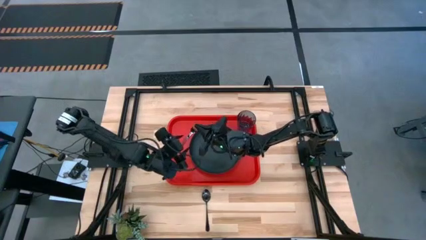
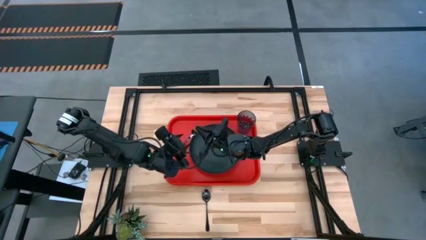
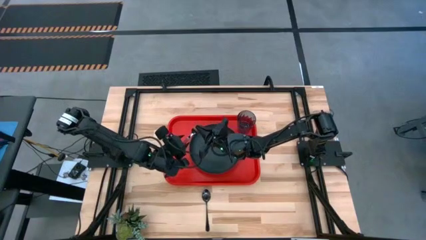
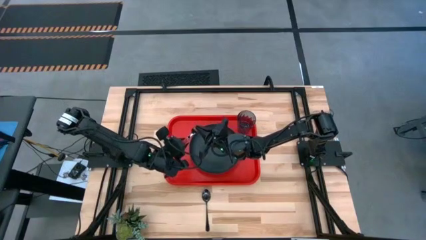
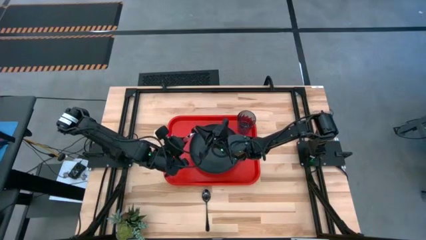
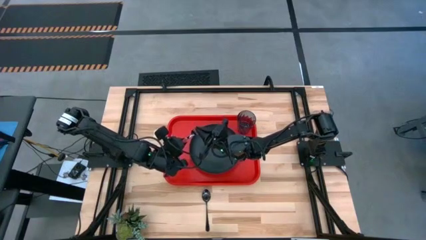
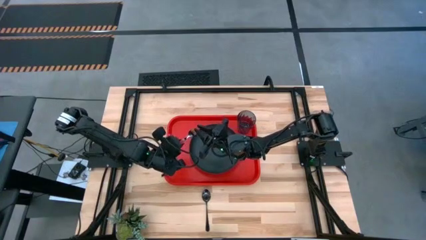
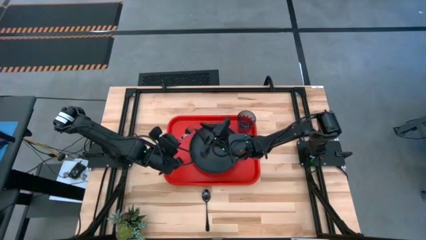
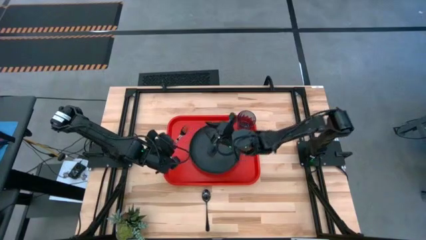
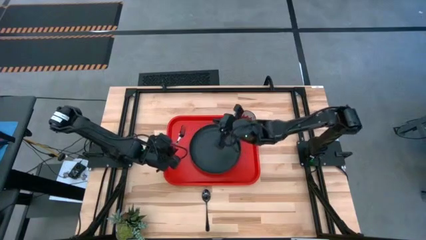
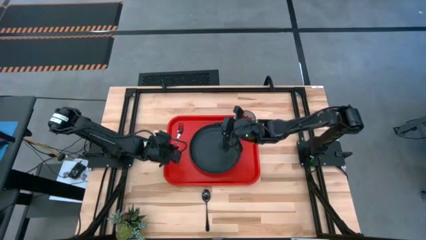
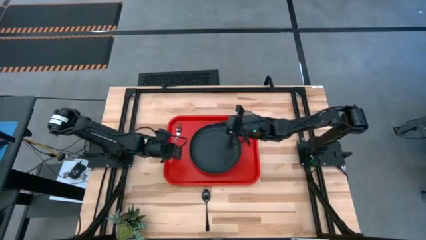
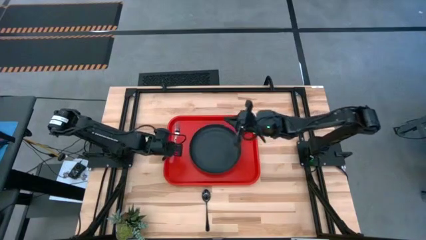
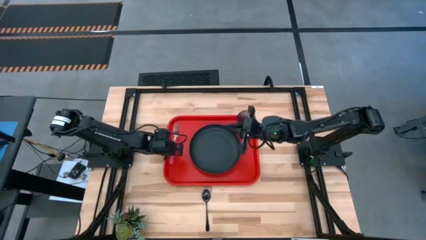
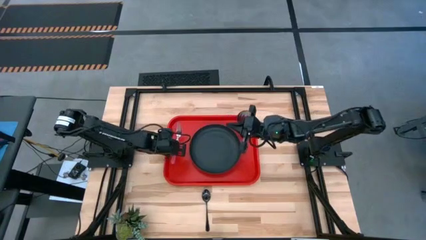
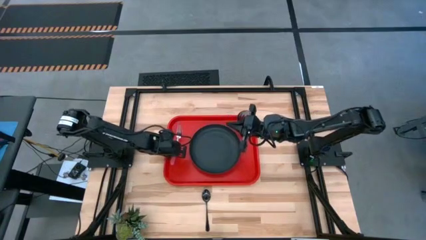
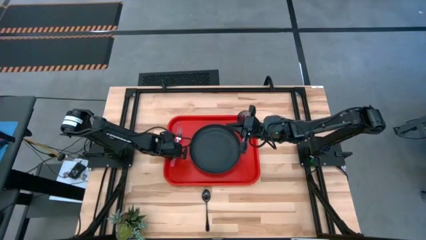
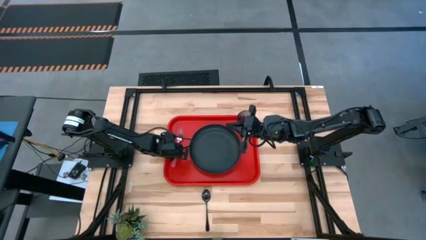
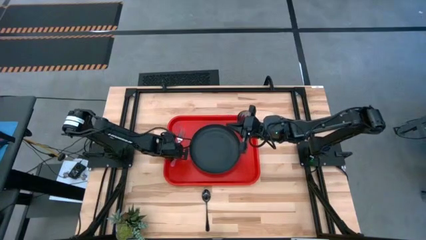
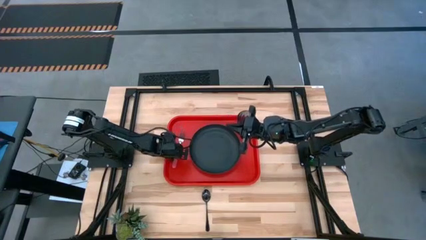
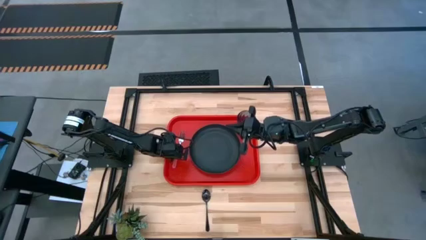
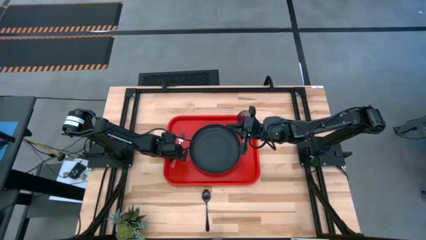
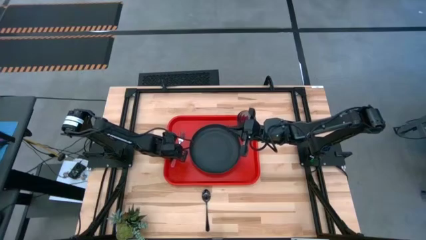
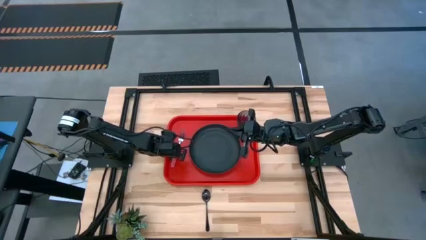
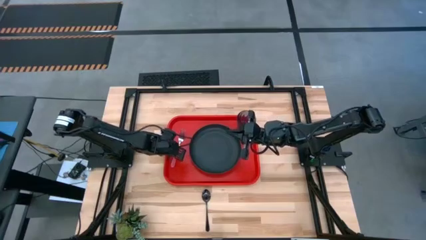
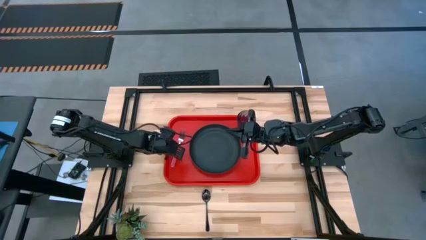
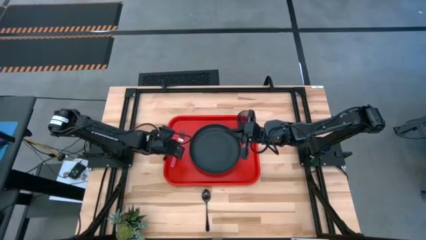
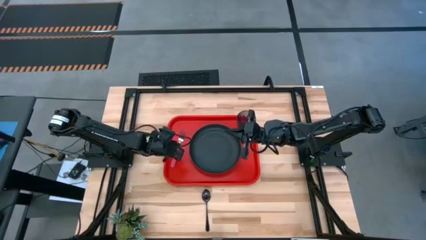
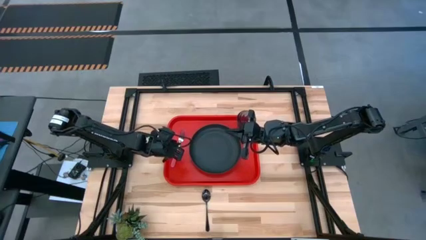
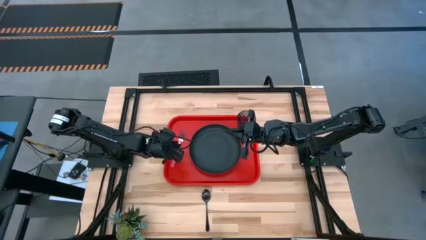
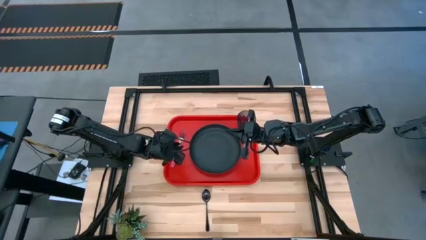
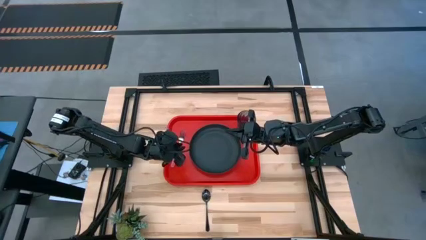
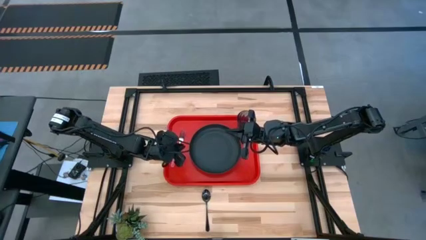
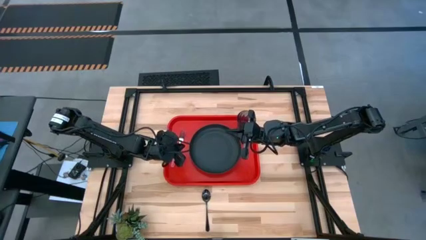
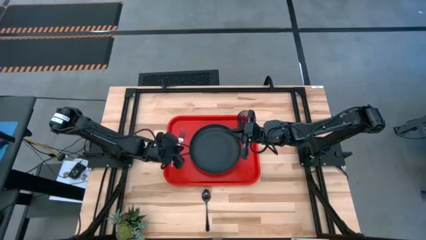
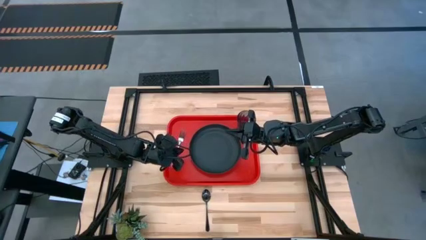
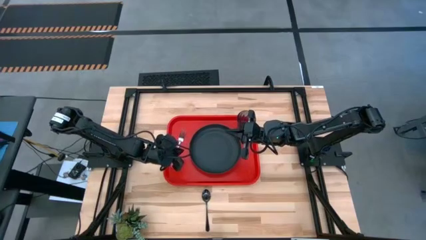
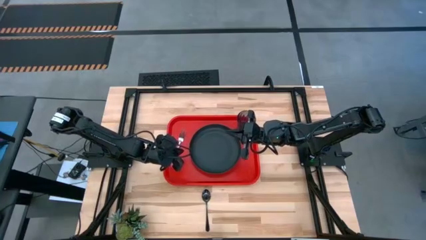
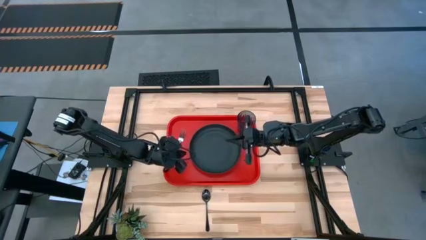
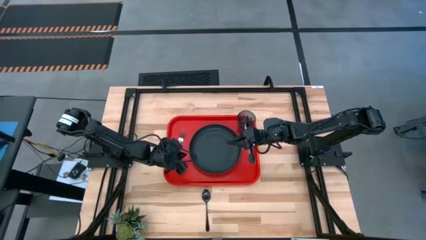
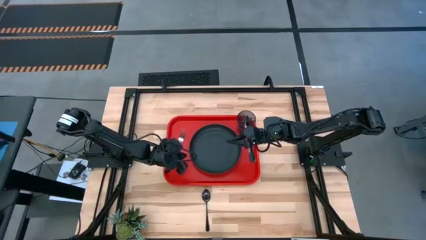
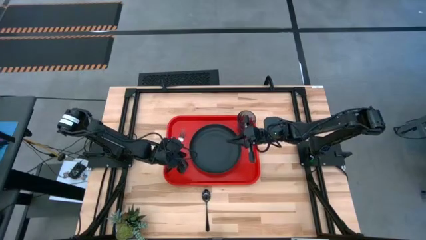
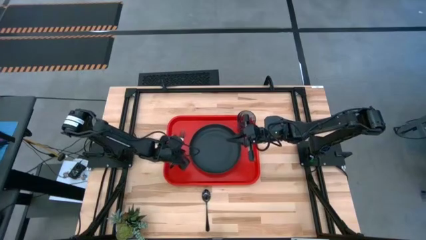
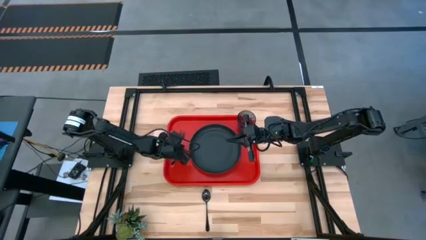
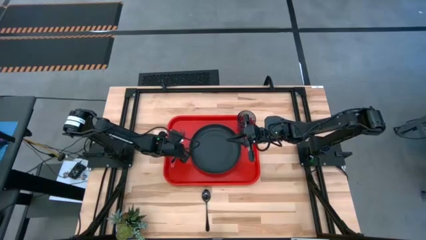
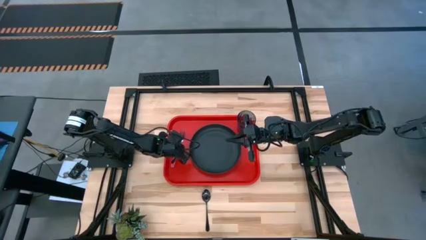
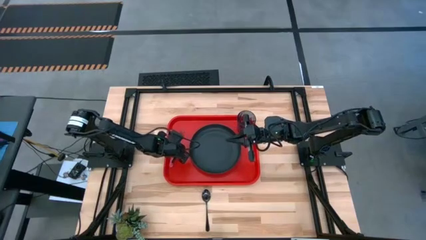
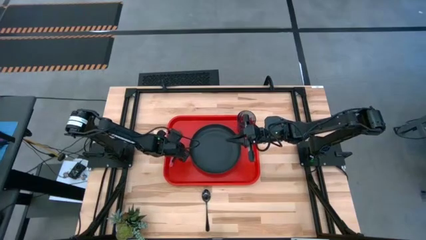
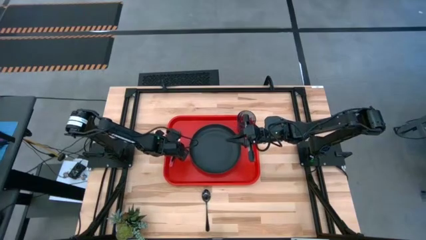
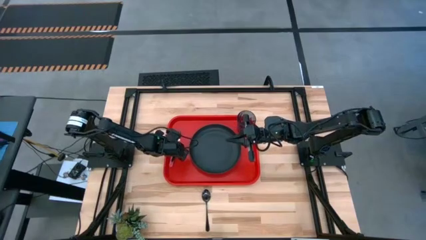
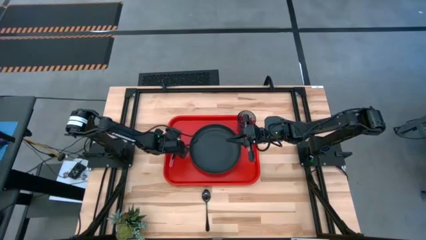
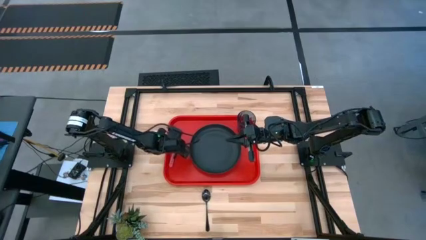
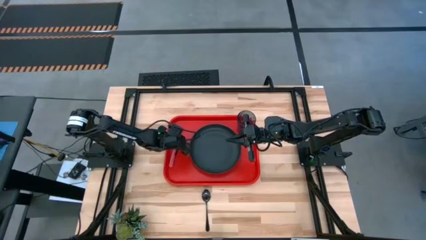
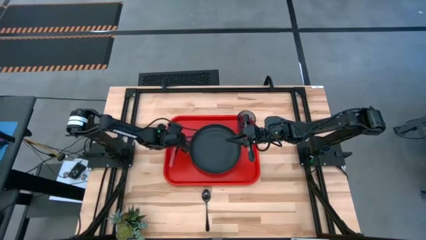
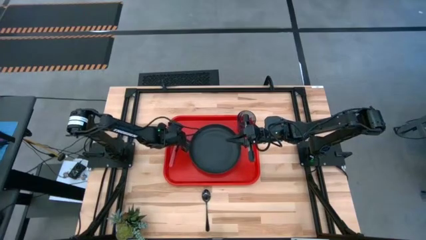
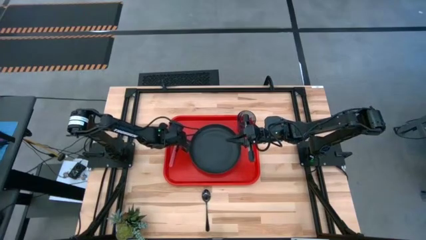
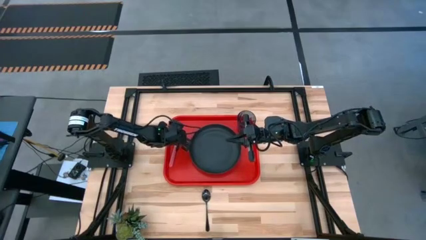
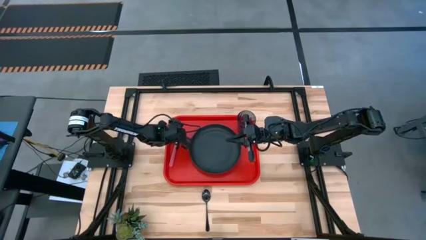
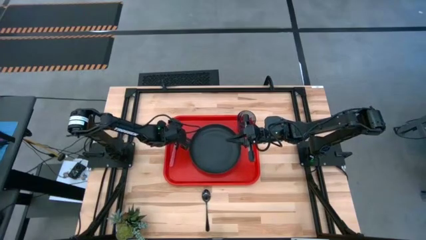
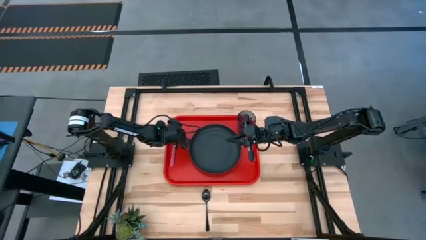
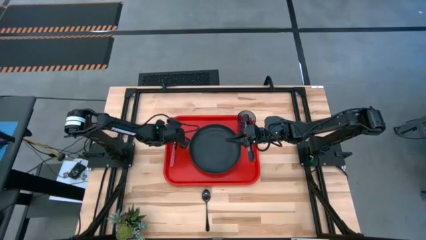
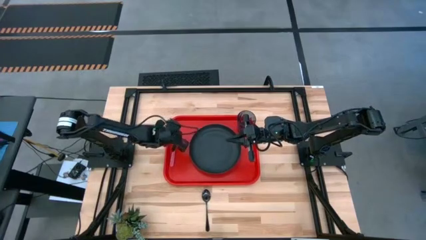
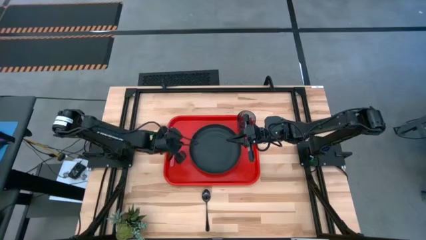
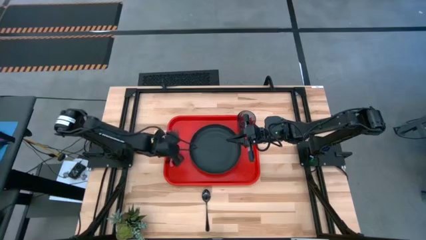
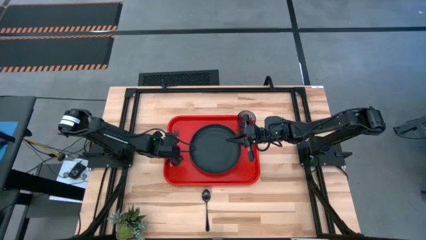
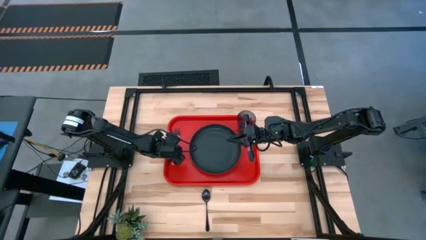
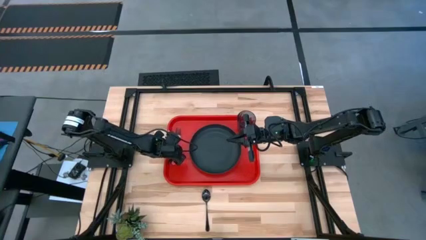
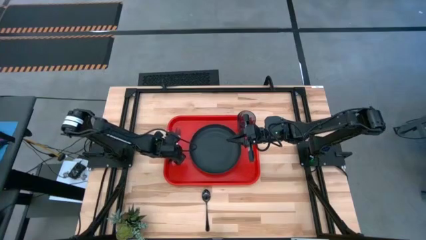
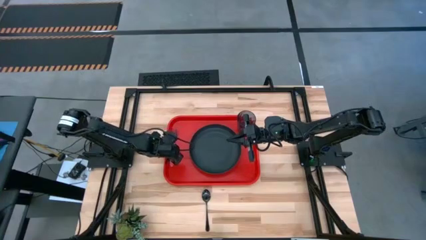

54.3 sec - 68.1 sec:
Task: Pick and place plate/cup/fork/spoon on tray
Put the pink fork on the red serving tray to the left of the black plate

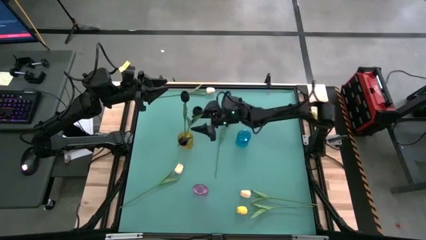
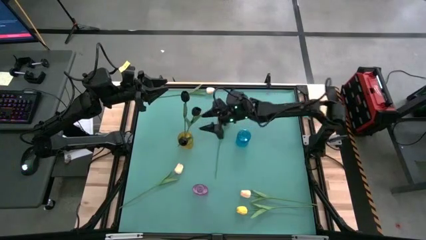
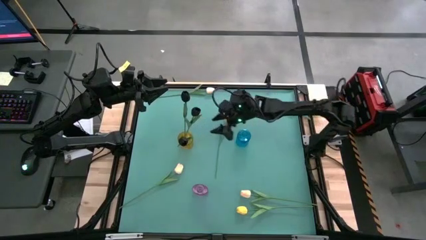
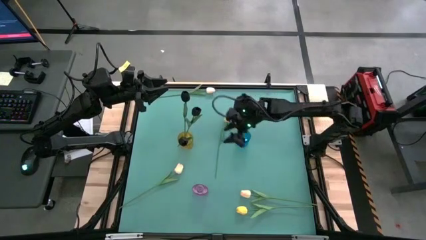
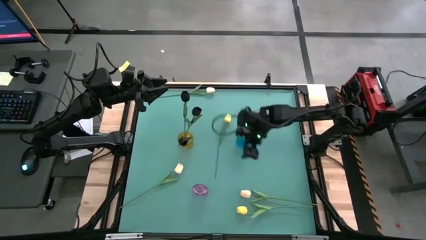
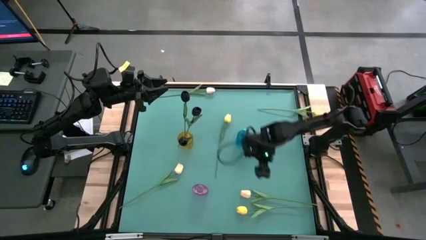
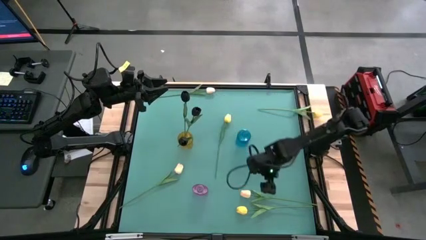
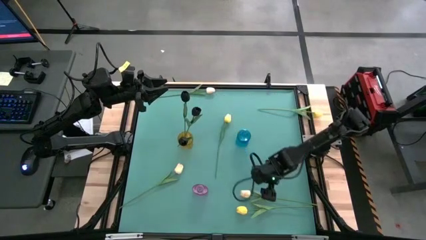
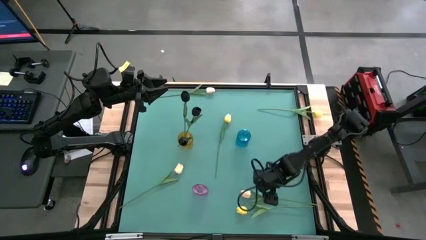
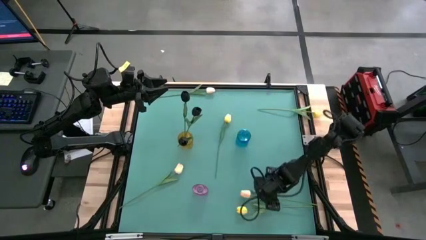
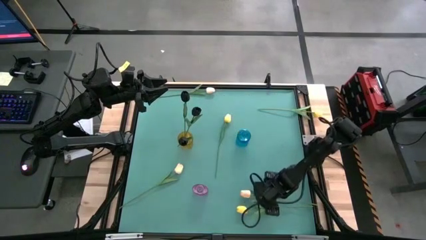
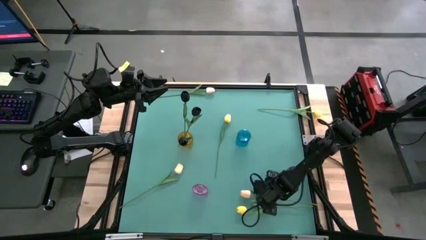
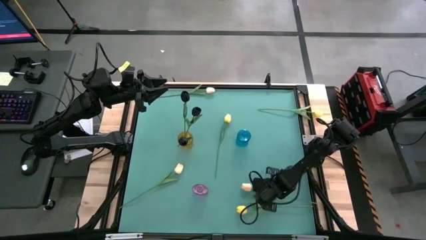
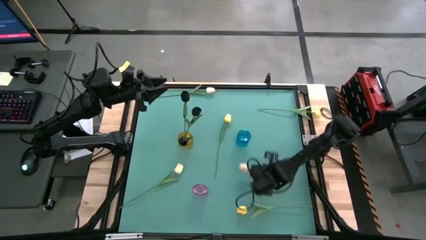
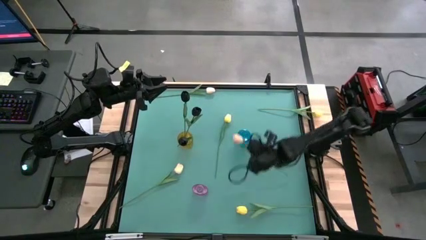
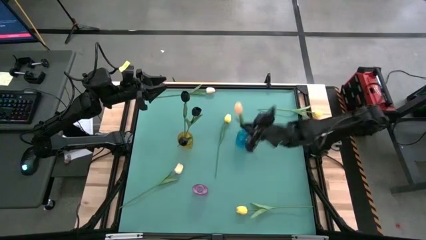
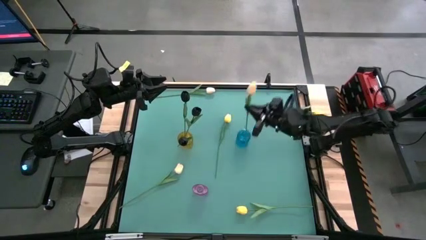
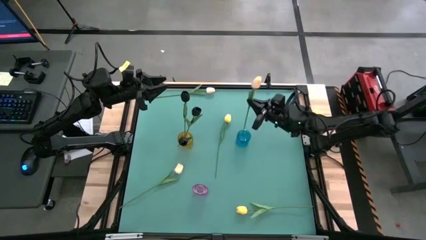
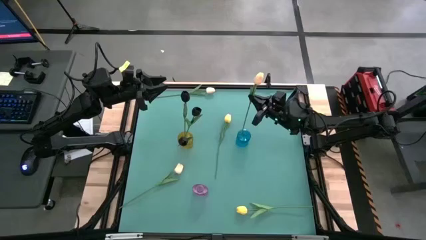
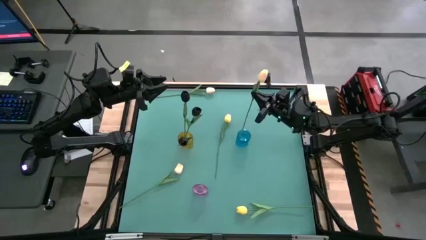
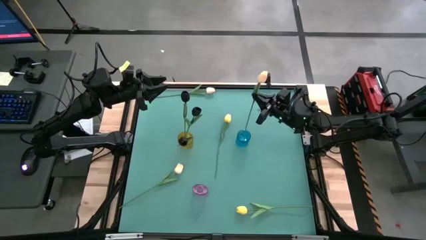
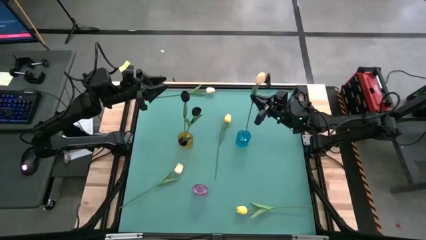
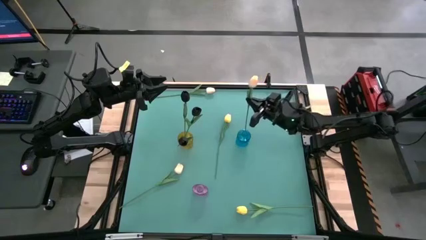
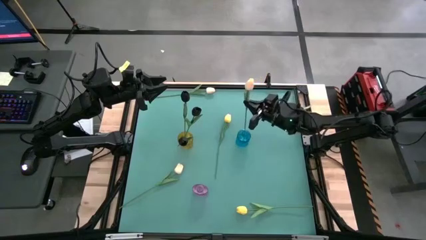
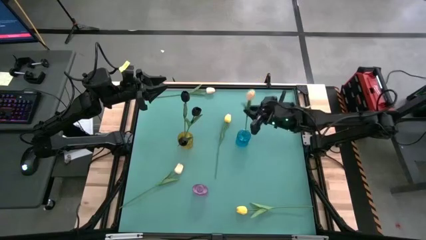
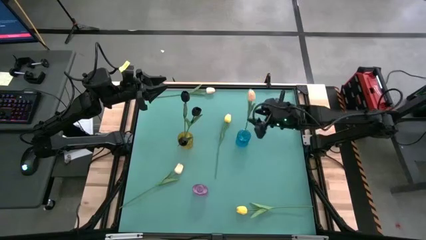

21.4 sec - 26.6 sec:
Task: Sort flowers into vase by color
Put the bottom right white tulip flower into the blue vase
